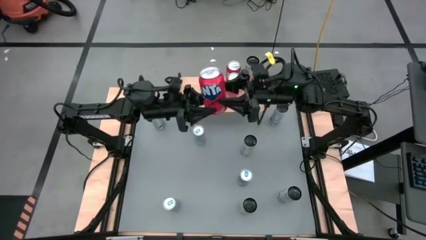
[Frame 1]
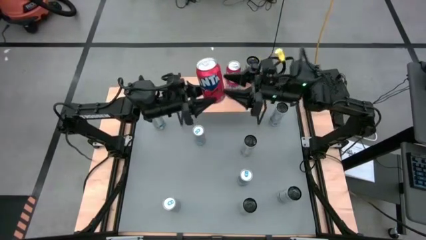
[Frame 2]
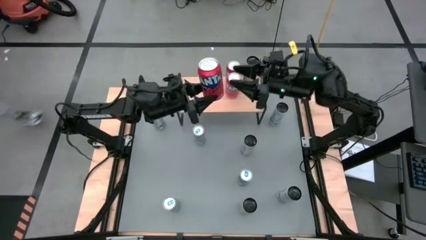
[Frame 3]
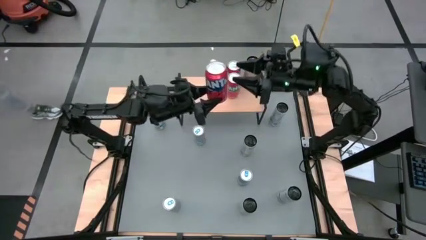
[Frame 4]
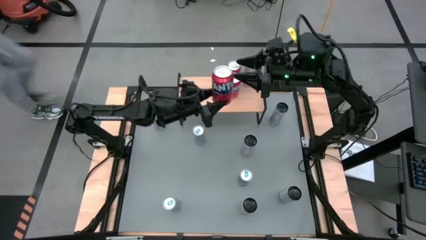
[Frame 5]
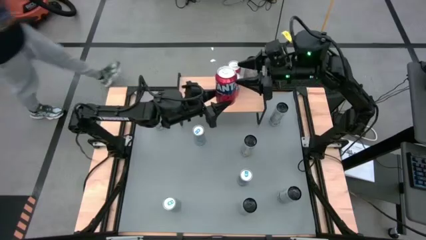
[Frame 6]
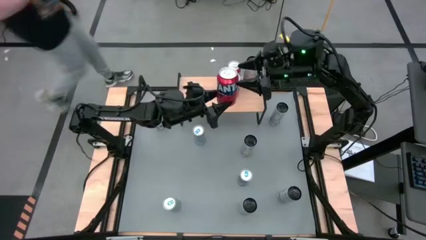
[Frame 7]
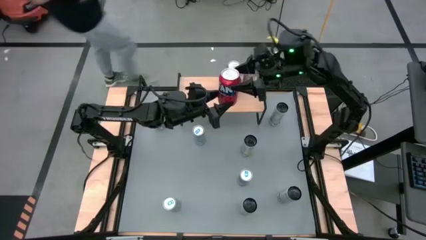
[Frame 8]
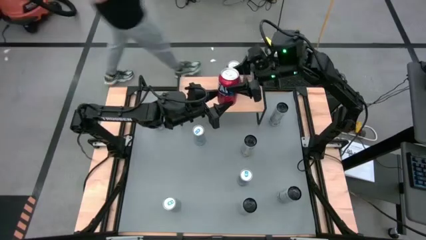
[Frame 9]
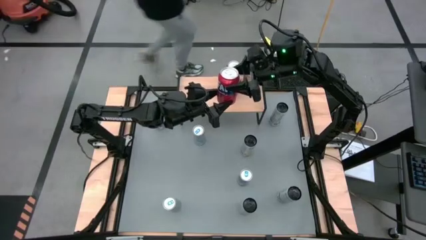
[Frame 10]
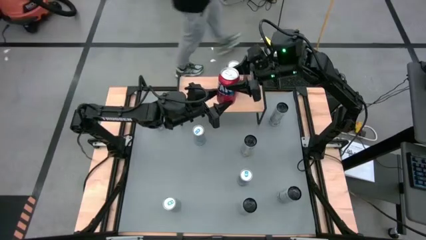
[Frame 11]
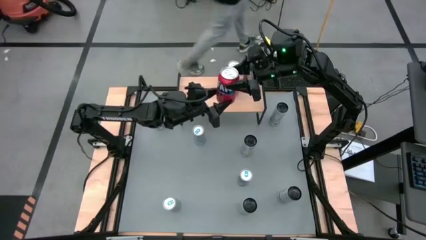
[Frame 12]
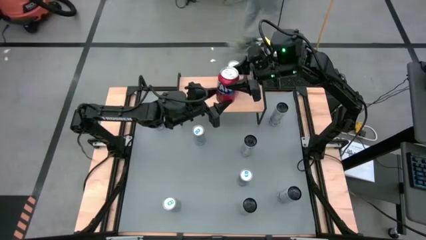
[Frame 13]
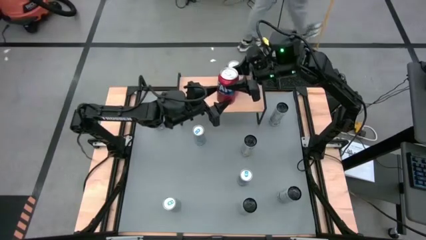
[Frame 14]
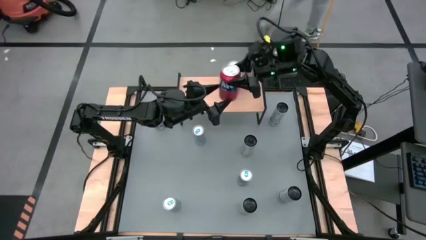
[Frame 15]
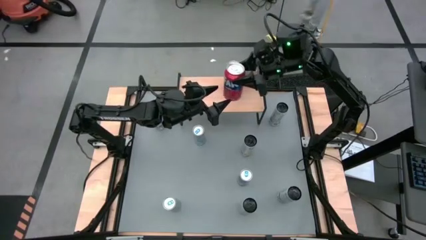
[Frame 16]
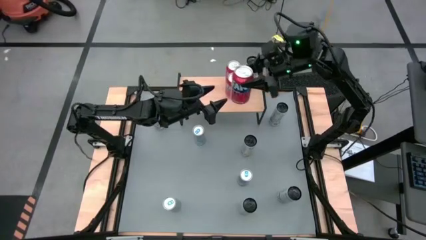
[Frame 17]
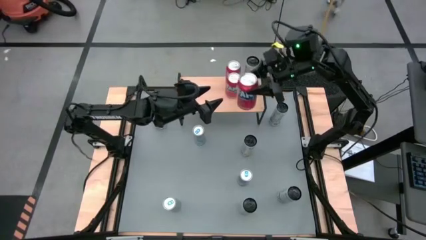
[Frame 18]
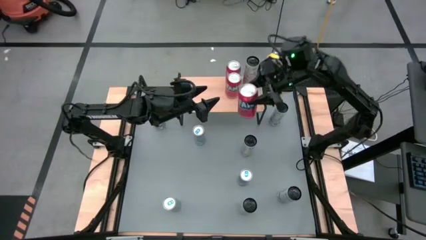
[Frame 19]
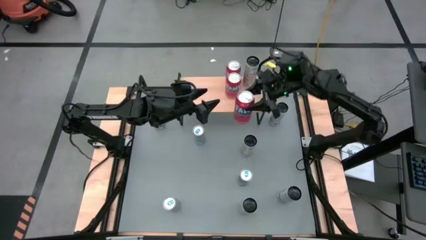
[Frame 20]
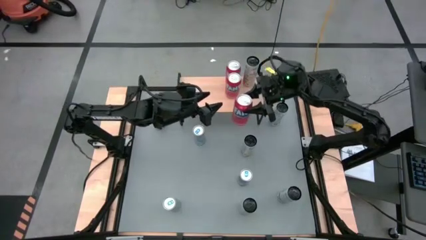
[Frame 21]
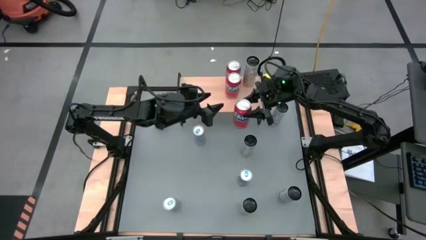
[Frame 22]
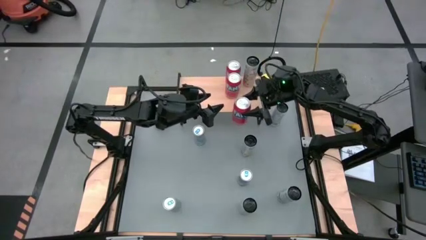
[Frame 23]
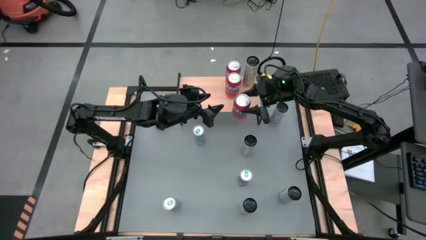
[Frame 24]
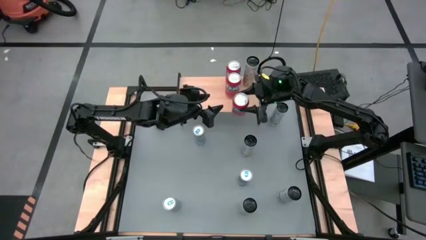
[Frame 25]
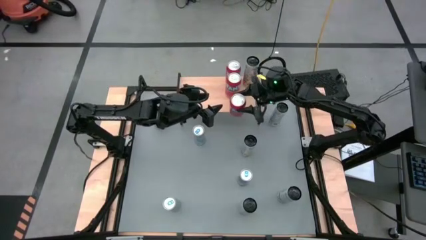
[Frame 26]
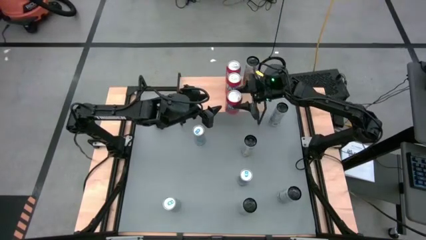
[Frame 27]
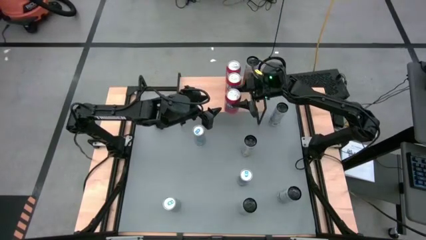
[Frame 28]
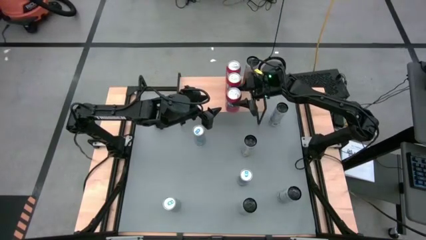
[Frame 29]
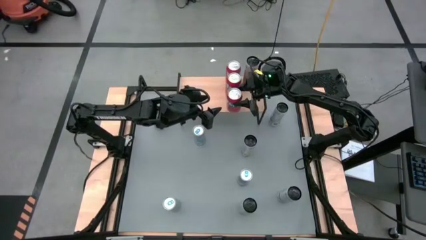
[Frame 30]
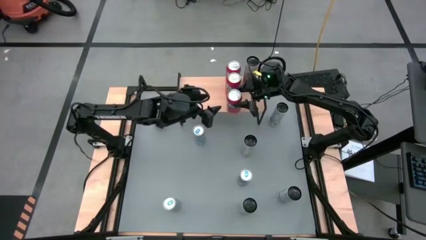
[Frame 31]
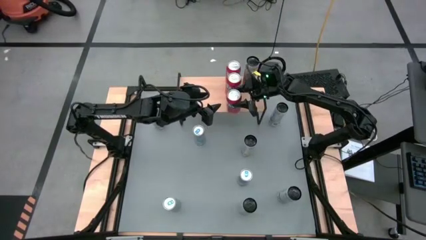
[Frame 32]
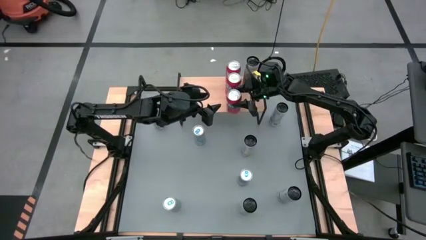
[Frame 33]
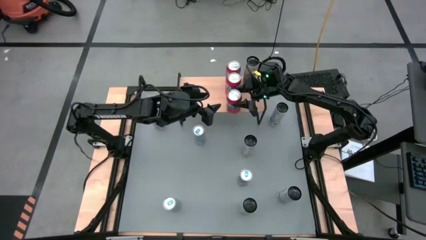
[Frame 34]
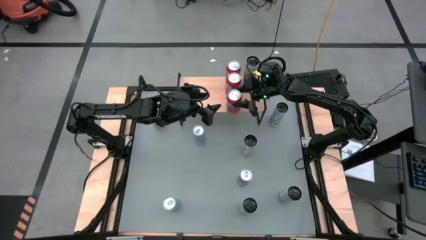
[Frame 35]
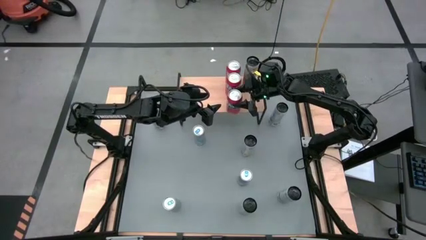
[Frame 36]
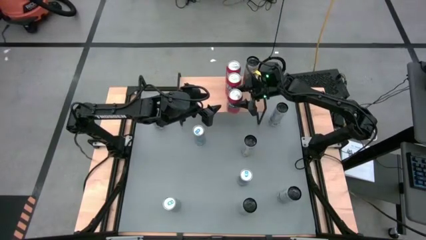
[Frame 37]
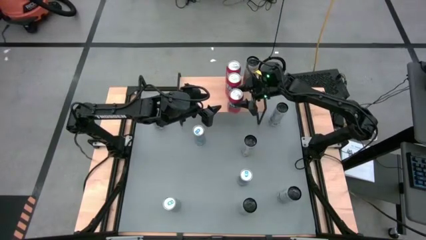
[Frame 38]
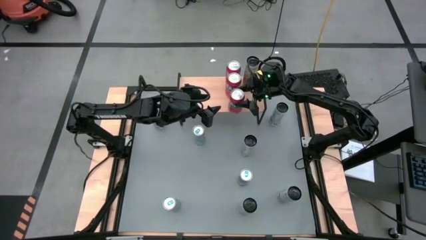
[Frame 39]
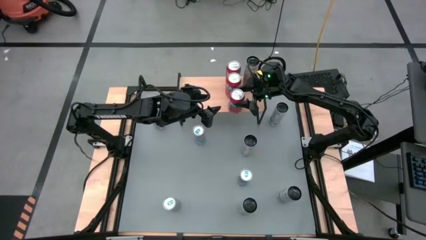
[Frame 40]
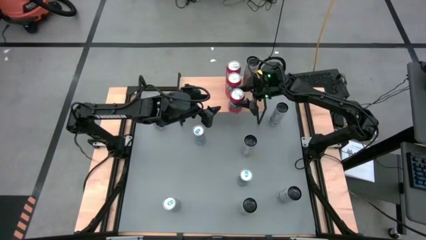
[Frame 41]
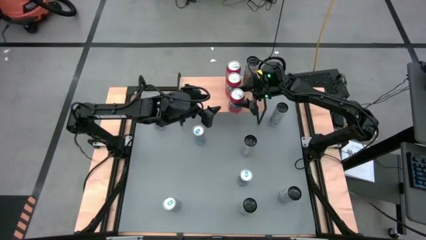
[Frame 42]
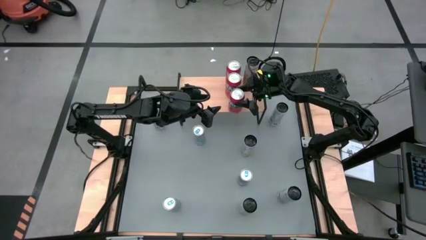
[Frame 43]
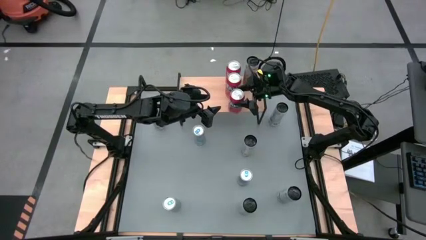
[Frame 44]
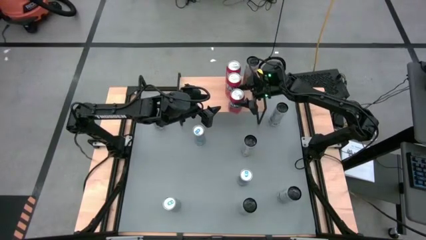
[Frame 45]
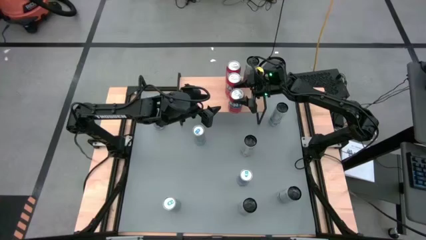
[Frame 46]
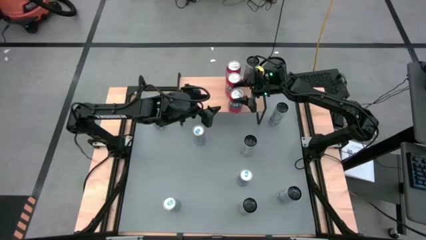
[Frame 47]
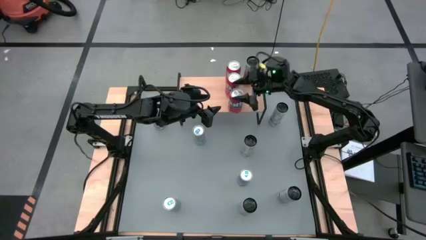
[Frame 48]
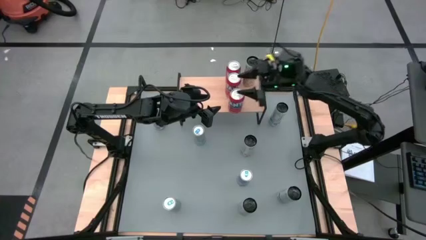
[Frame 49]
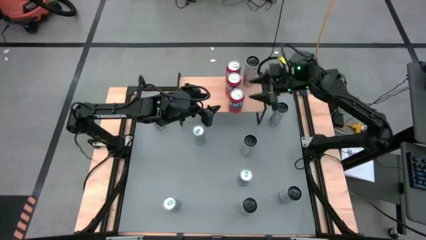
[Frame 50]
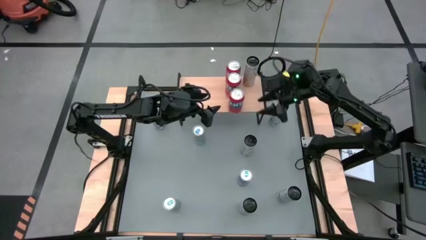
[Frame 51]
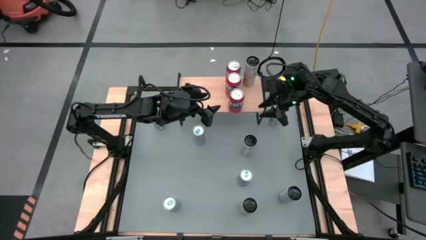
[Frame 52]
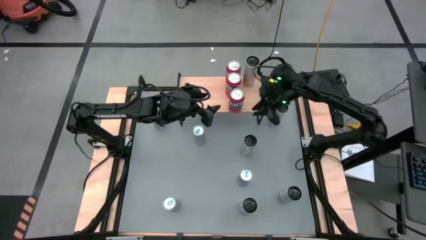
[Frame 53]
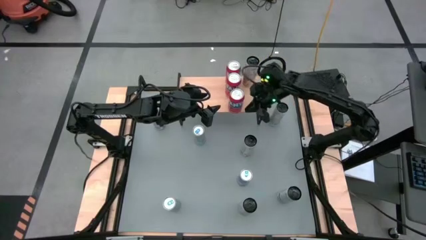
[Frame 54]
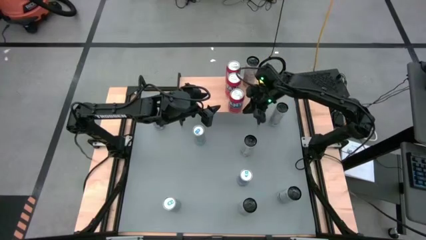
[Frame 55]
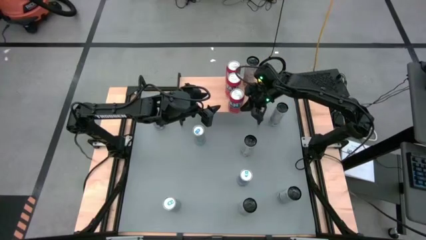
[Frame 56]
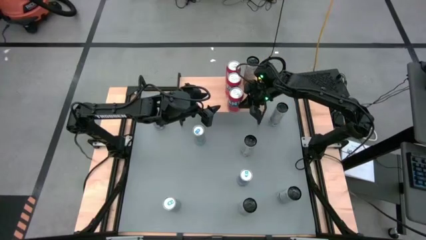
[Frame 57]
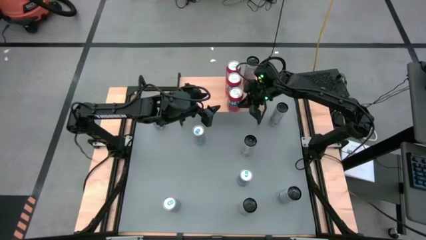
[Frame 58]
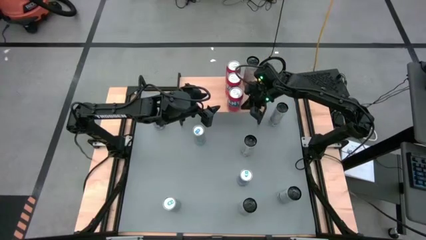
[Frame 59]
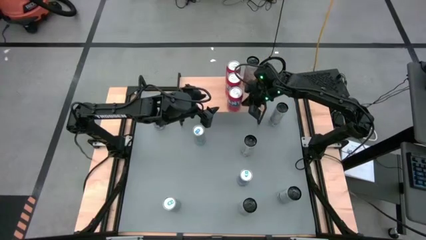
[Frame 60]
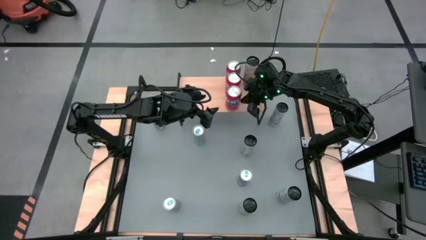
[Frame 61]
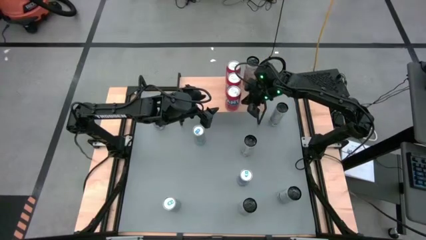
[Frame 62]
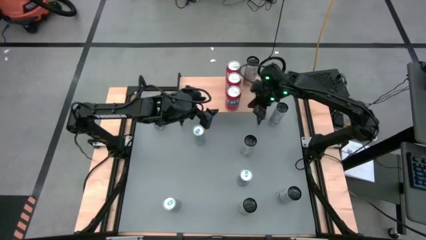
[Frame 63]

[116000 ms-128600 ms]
Task: Place canned beverage on shelf
Put the orange soda can on the shelf aligned with the other orange soda can

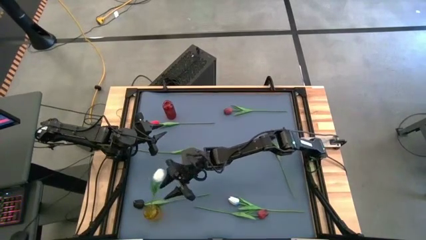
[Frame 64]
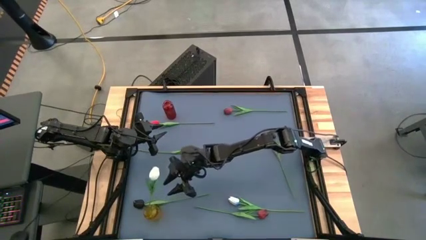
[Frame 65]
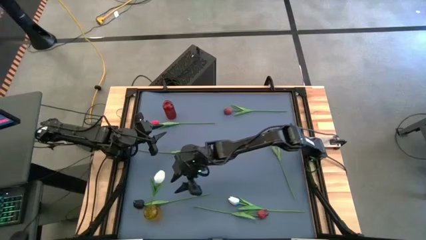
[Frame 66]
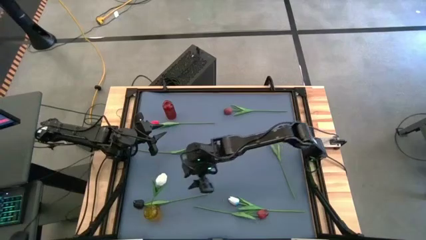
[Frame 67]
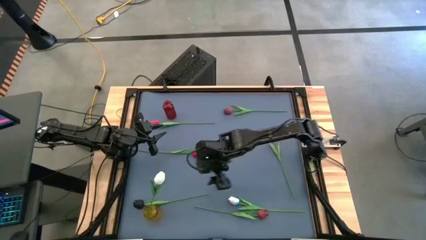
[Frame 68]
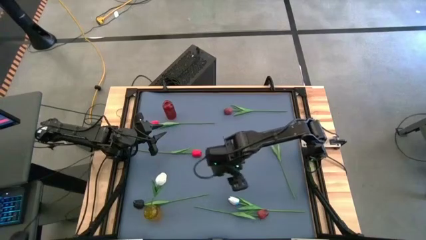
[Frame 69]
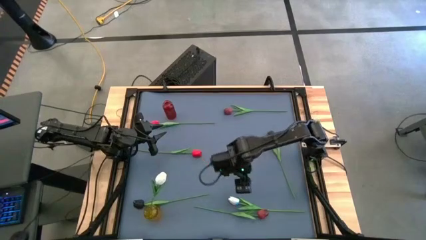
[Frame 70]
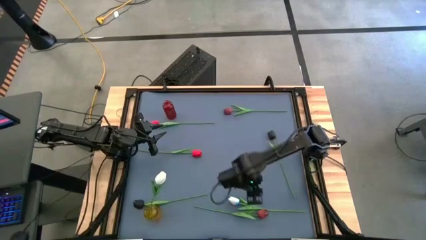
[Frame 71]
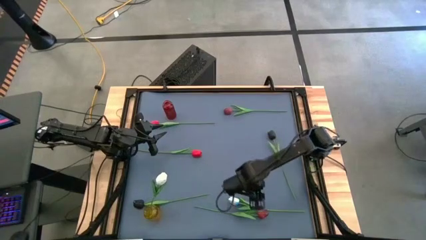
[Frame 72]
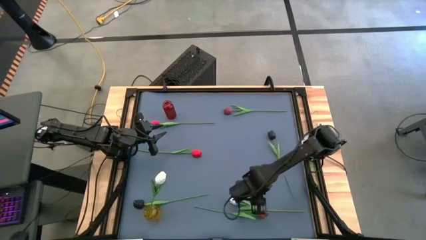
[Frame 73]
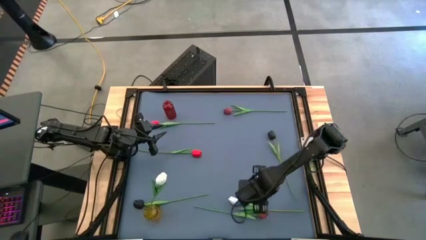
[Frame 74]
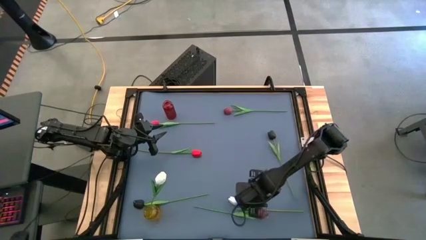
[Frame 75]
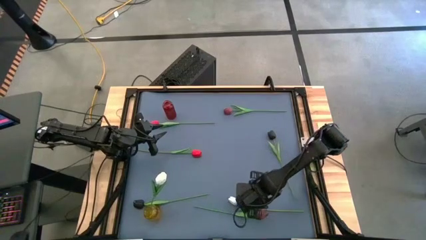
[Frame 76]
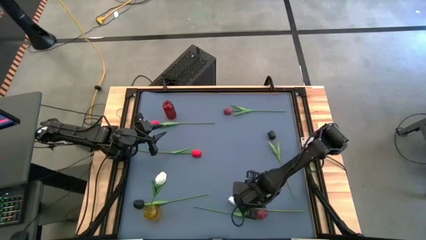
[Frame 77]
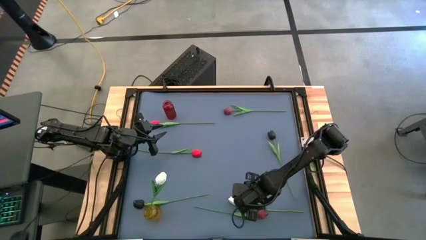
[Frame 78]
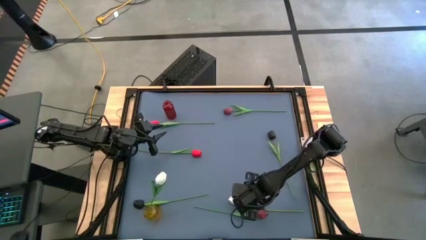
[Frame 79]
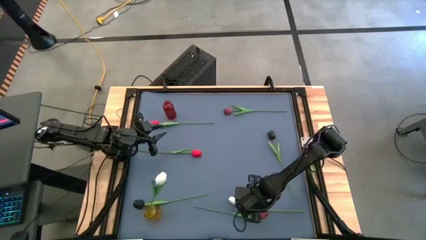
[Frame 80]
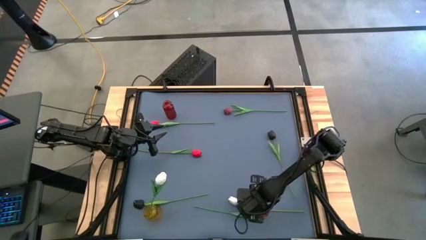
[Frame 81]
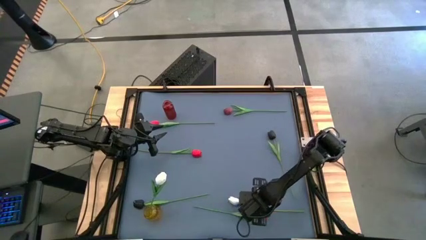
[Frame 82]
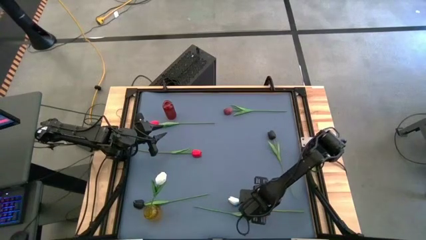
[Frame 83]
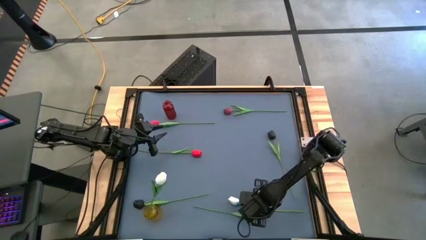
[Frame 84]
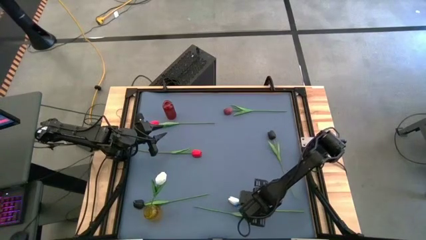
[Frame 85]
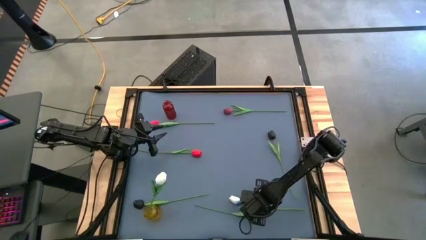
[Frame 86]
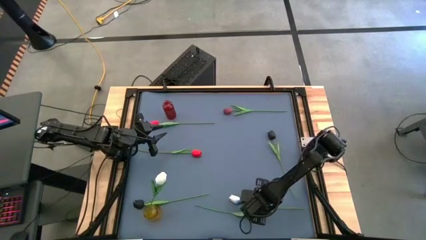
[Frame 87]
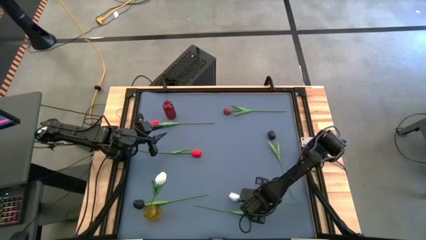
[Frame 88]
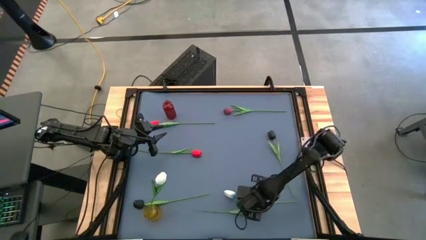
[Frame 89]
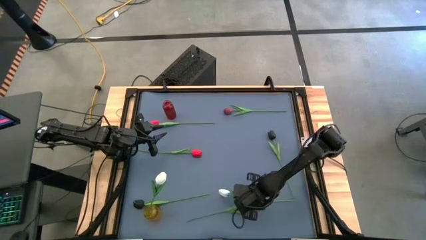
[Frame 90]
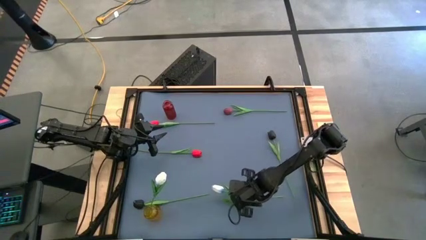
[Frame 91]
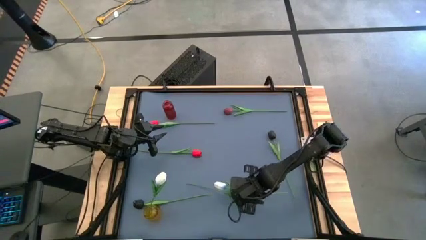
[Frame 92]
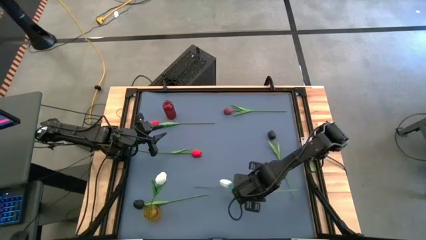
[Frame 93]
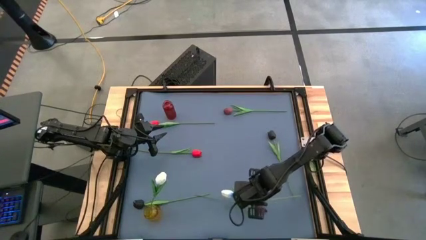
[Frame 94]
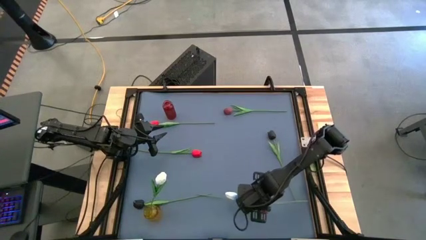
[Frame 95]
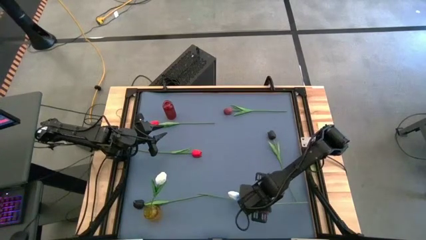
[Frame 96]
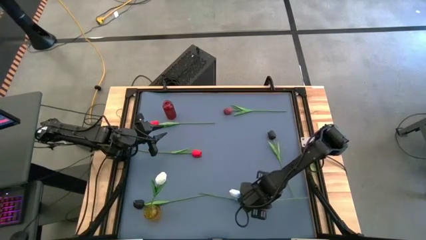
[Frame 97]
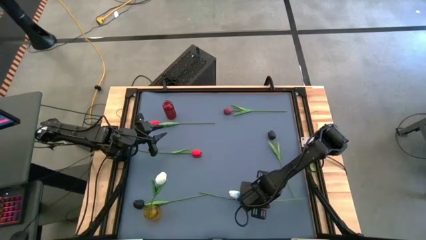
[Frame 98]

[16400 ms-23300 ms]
Task: Sort flowers into vase by color
Put the white tulip into the yellow vase
